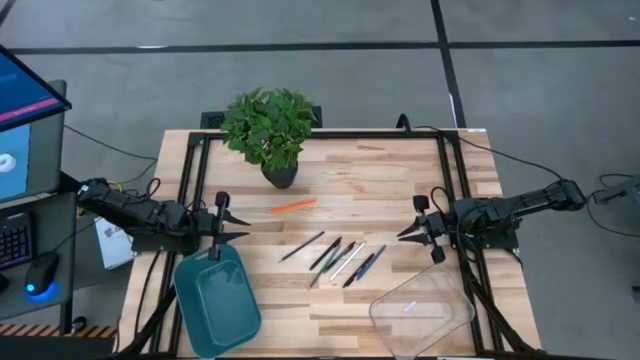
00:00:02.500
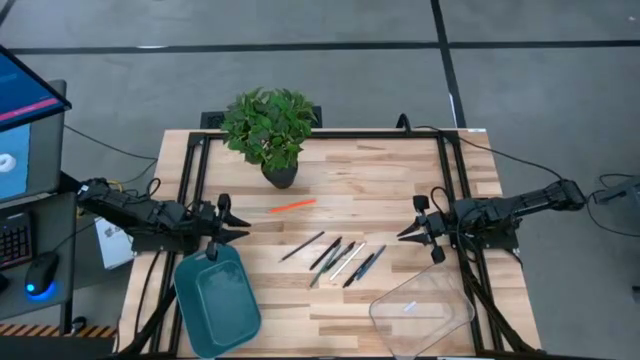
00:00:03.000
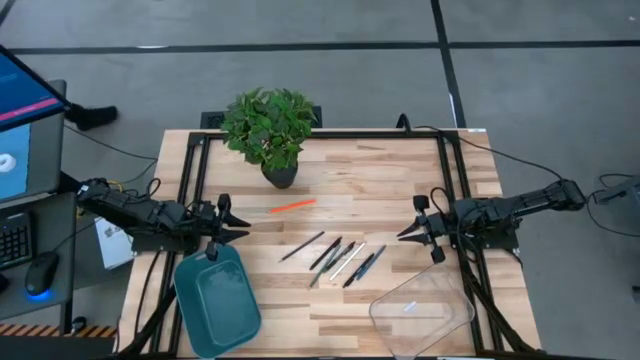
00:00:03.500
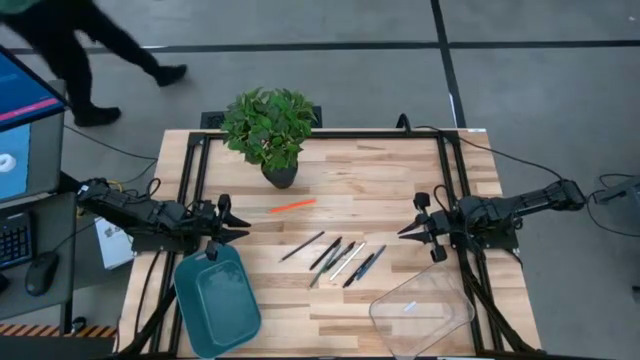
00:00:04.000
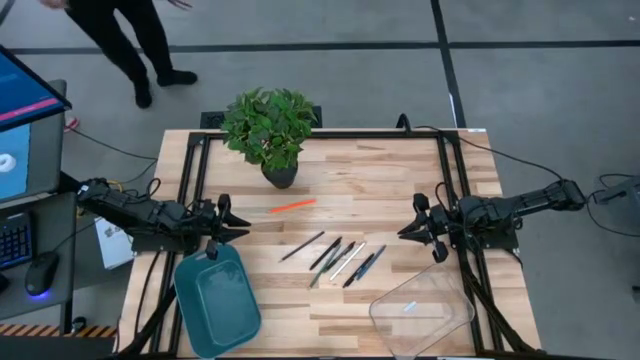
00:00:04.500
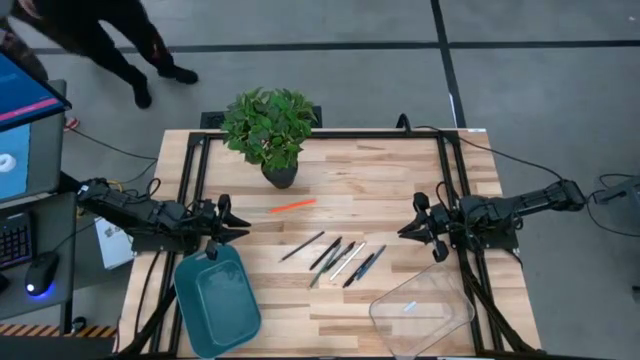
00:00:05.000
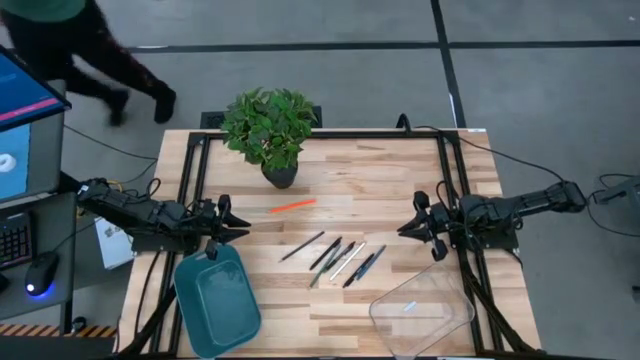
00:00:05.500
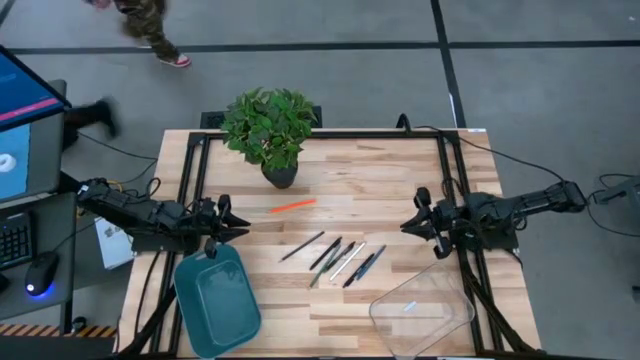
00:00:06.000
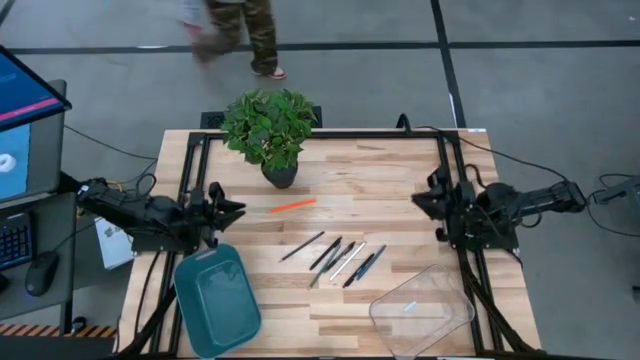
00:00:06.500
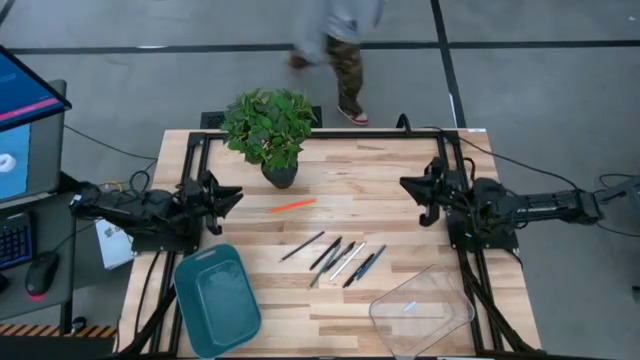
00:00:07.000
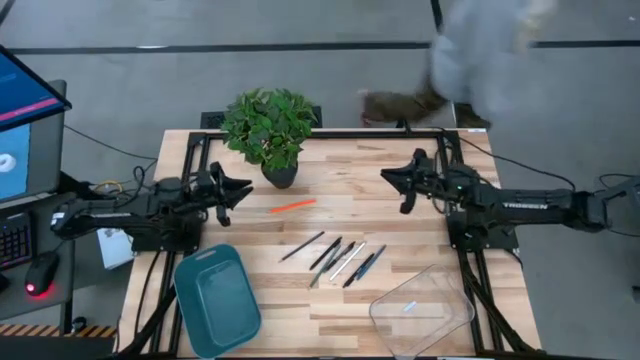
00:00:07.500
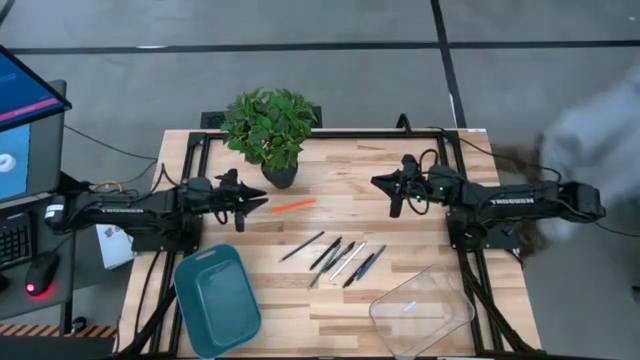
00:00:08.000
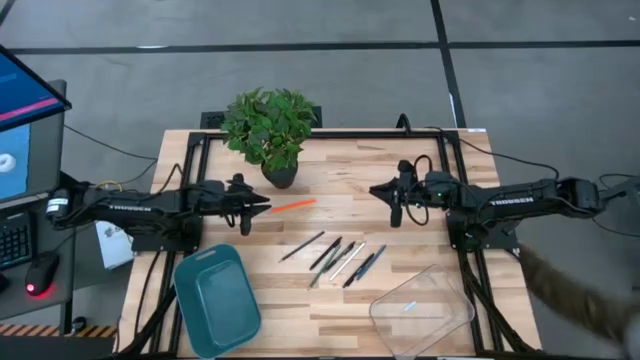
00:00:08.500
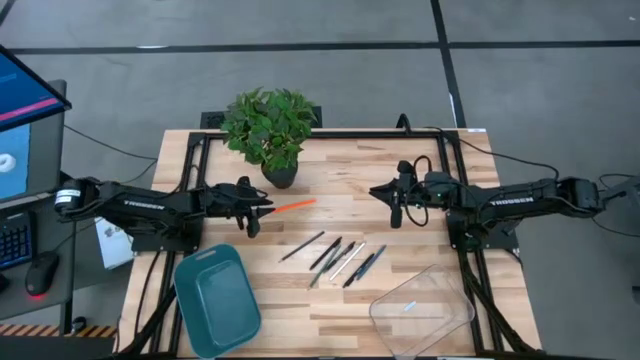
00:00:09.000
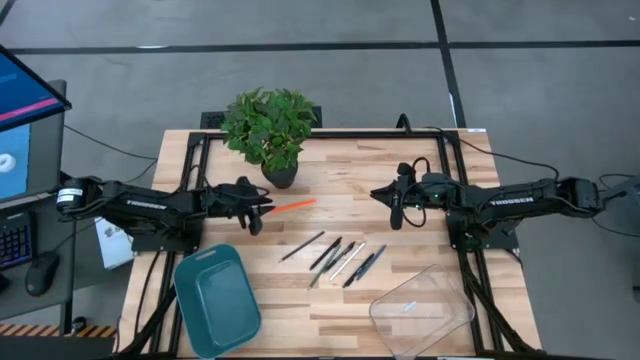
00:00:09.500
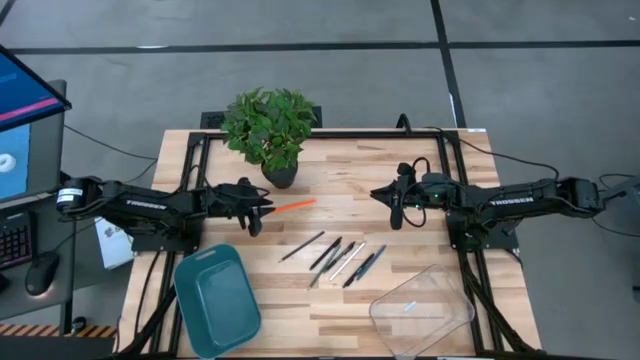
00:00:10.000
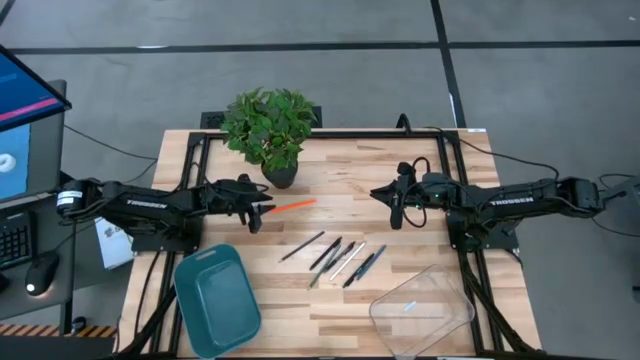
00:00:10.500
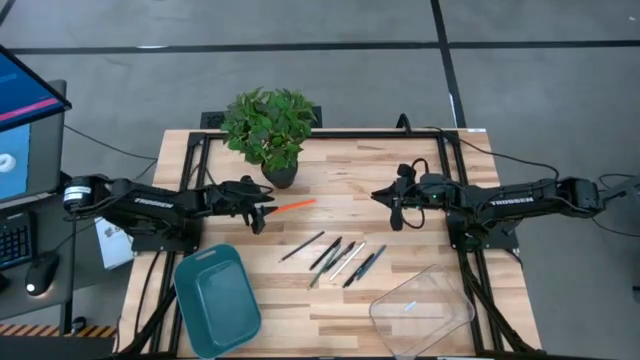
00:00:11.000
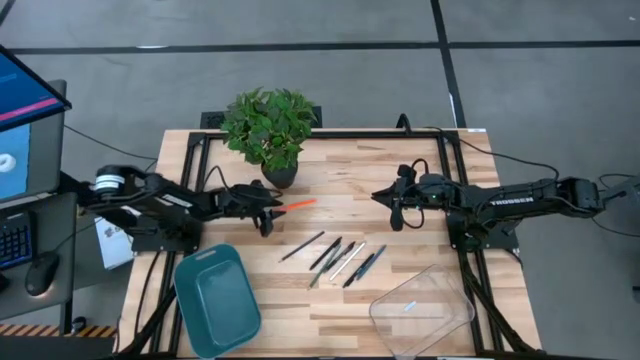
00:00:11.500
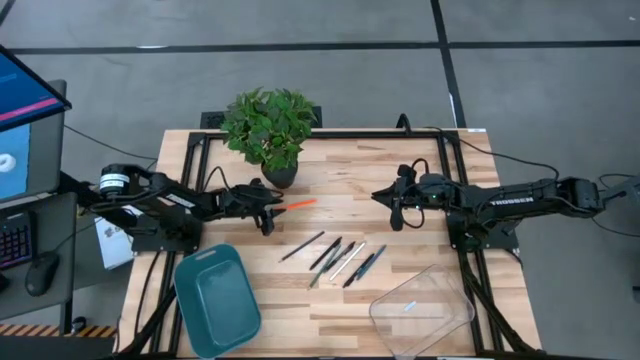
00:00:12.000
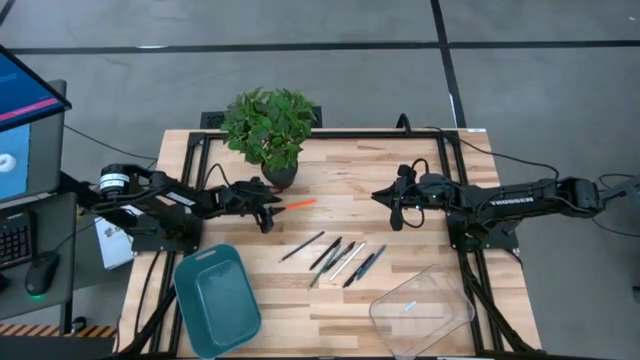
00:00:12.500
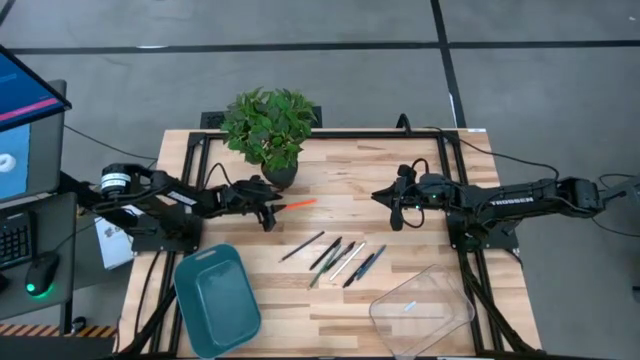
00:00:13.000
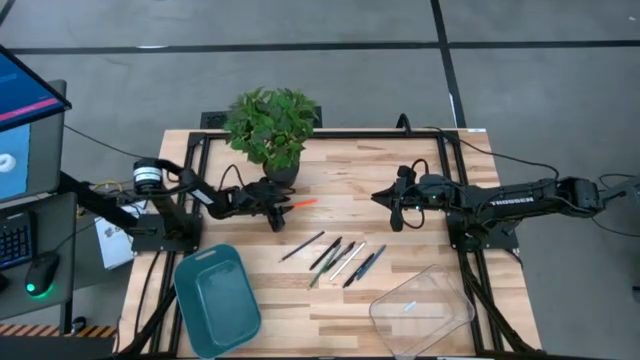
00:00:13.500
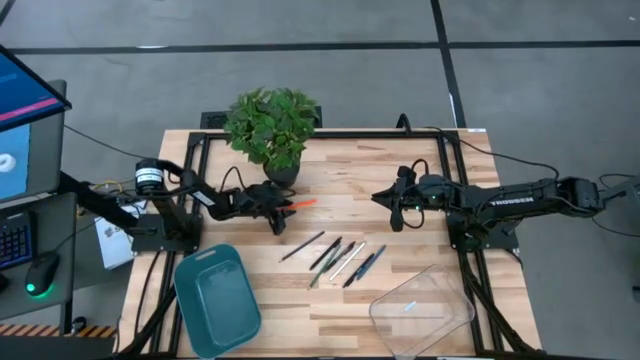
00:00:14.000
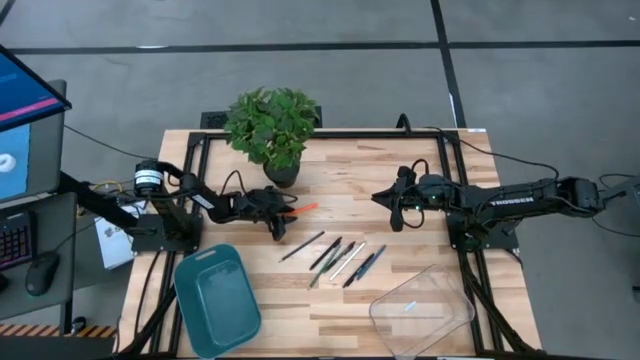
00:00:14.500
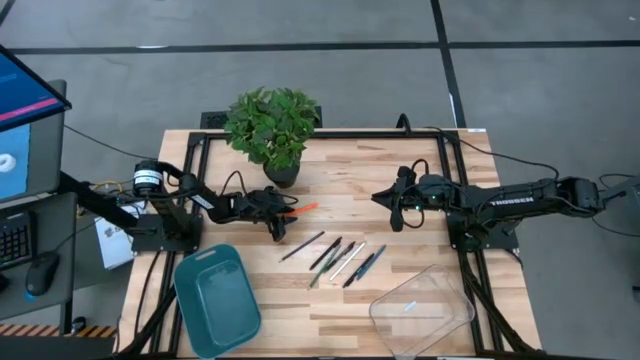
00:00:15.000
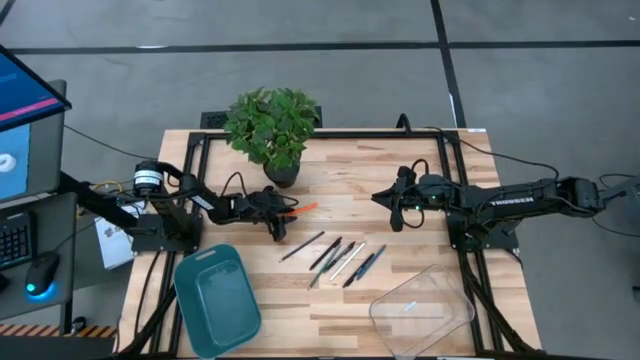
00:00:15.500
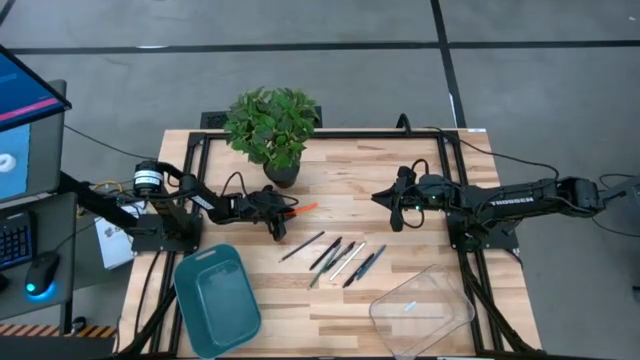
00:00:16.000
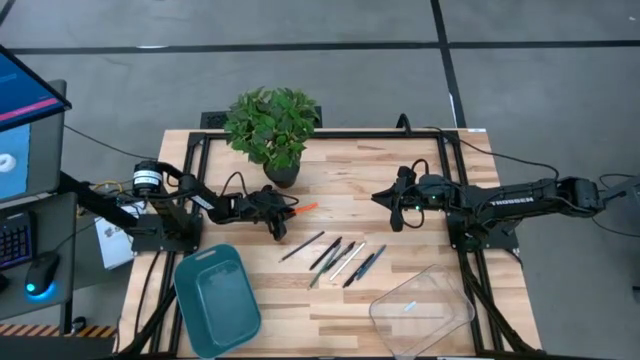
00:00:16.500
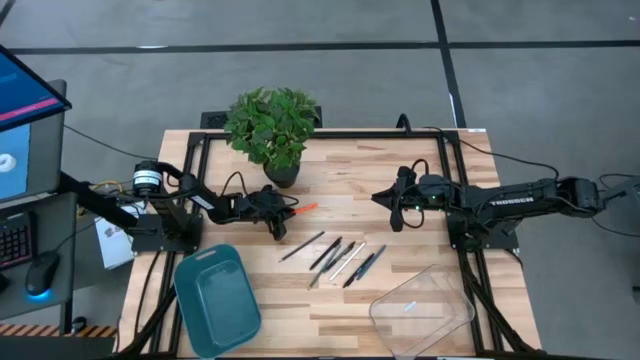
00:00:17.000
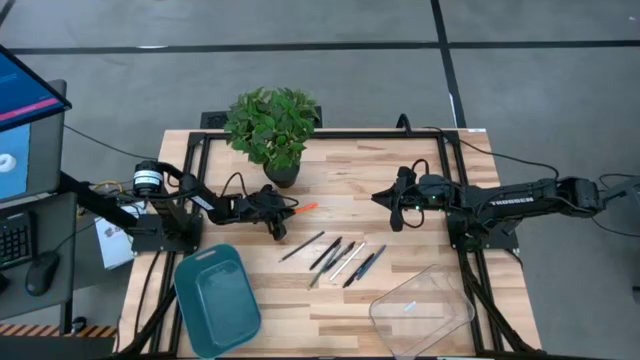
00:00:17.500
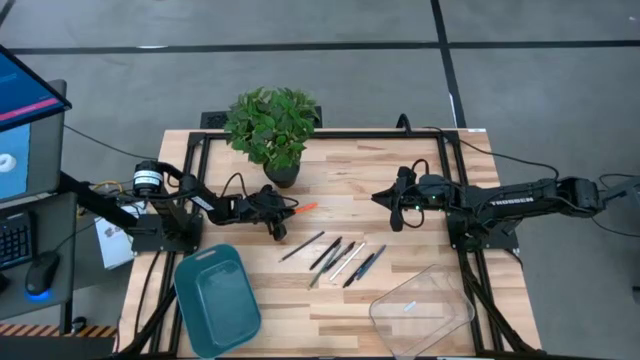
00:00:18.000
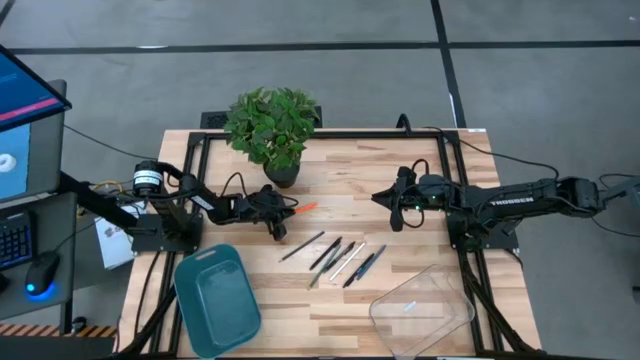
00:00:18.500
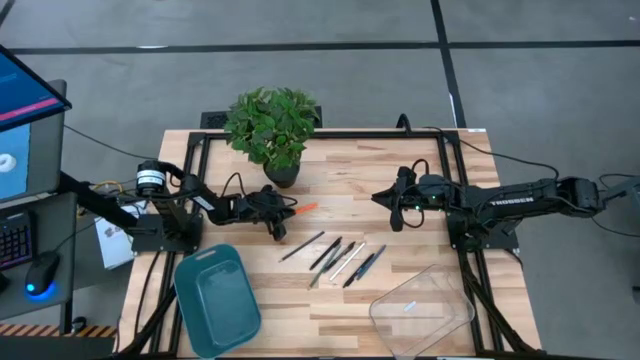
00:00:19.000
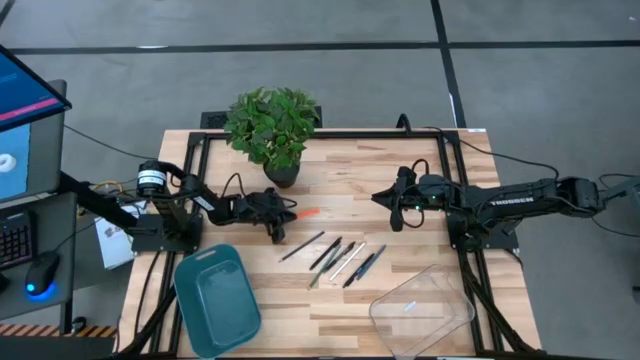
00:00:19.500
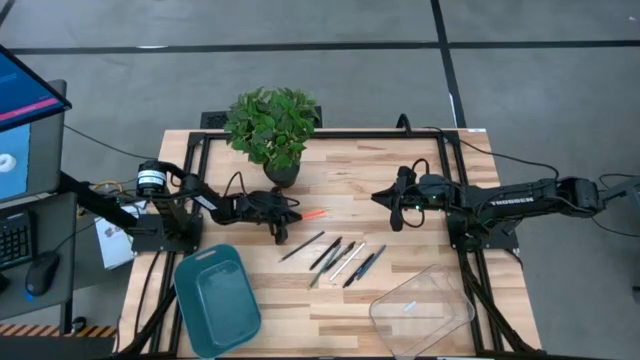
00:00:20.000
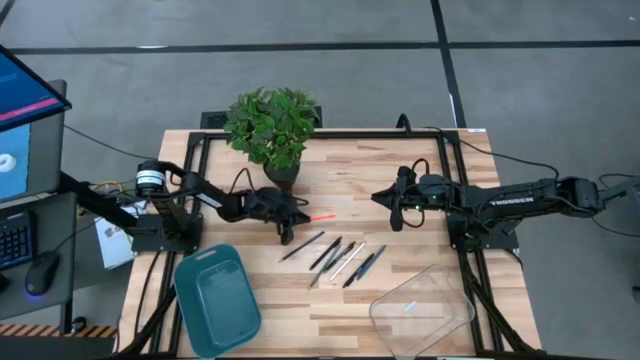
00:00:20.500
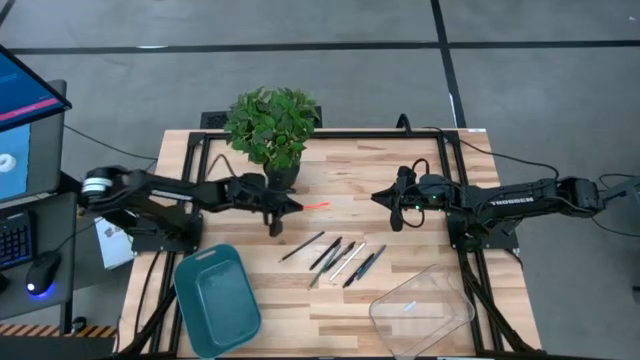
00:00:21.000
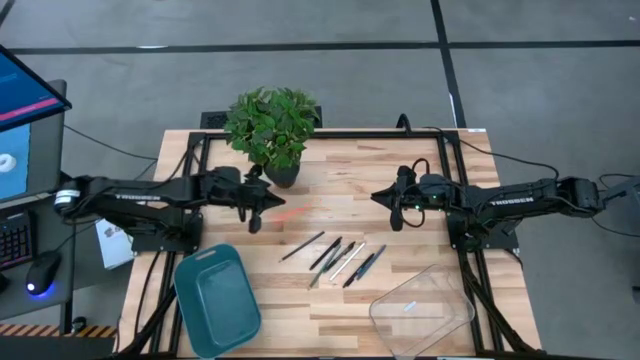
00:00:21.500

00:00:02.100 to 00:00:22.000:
Task: Sort pens & pencils
Put the orange pencil into the blue bin
